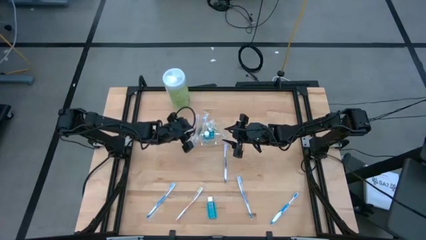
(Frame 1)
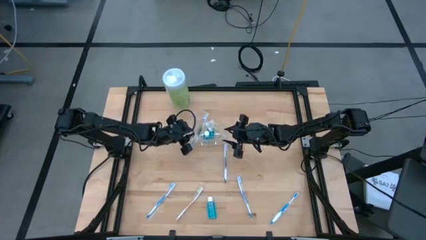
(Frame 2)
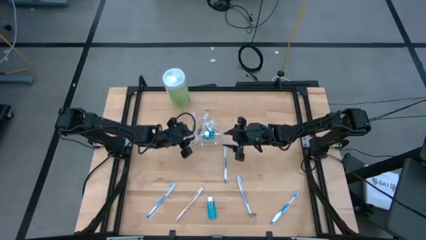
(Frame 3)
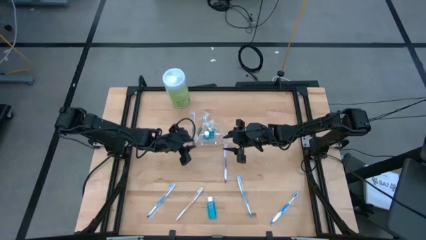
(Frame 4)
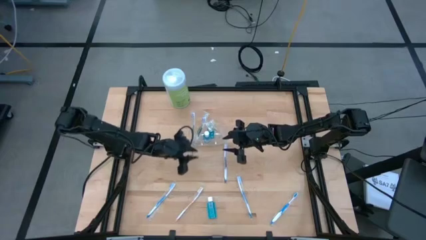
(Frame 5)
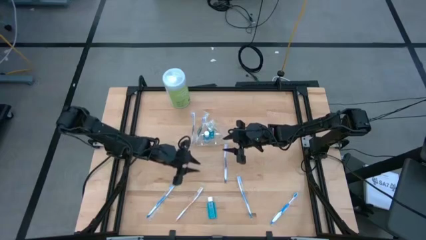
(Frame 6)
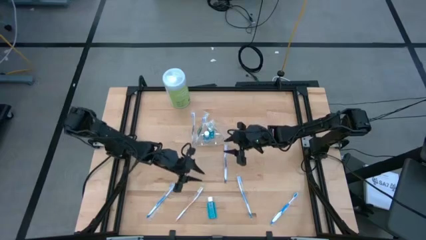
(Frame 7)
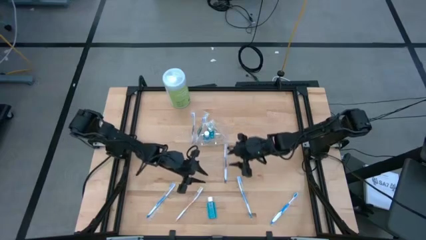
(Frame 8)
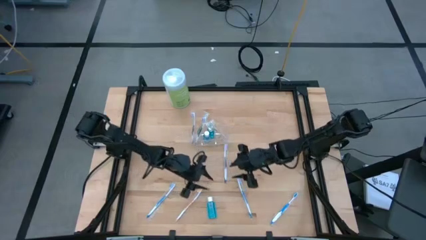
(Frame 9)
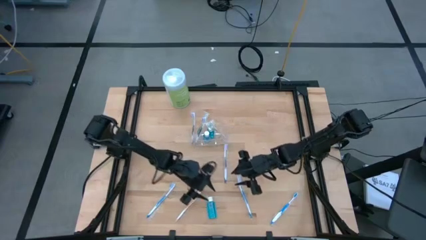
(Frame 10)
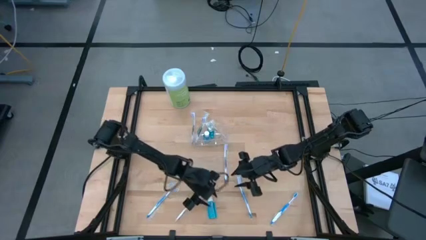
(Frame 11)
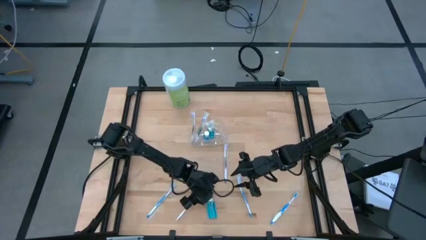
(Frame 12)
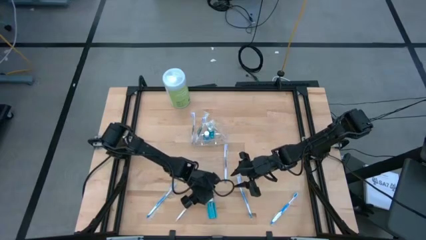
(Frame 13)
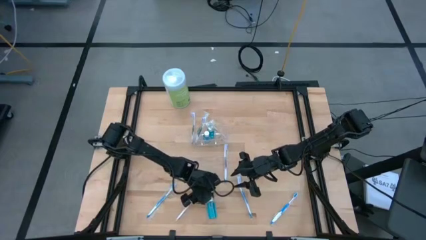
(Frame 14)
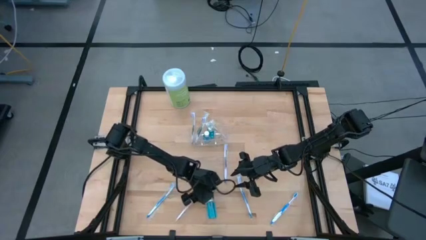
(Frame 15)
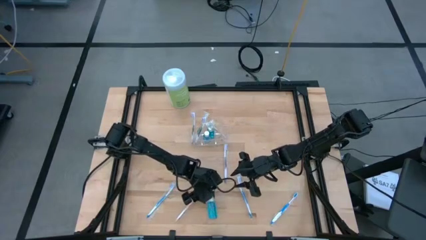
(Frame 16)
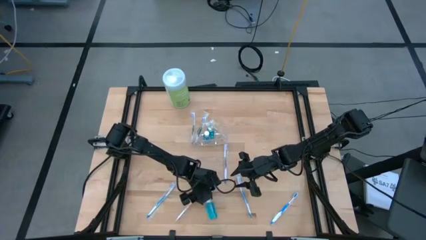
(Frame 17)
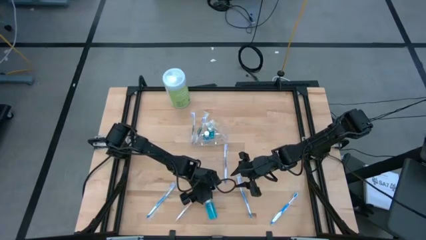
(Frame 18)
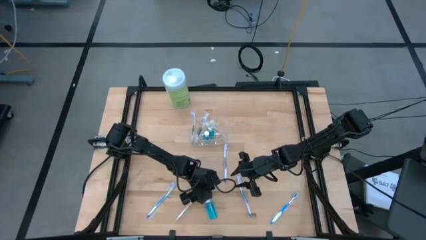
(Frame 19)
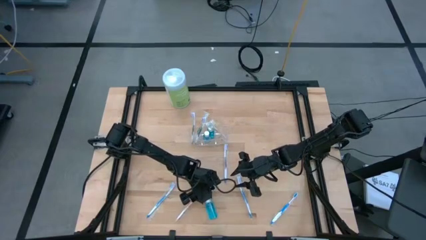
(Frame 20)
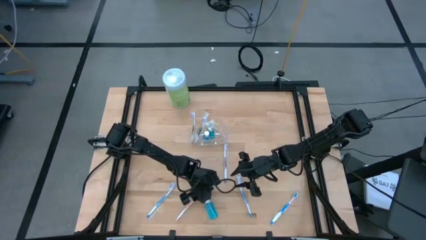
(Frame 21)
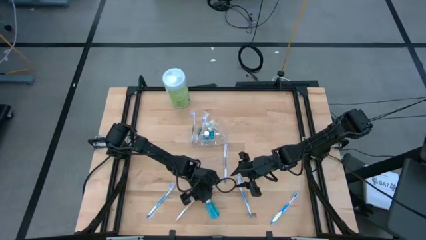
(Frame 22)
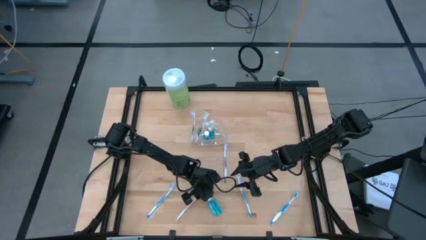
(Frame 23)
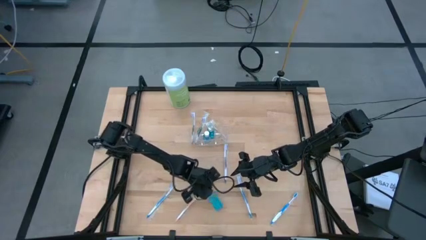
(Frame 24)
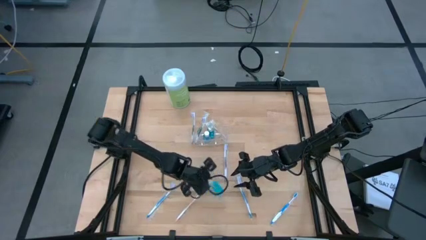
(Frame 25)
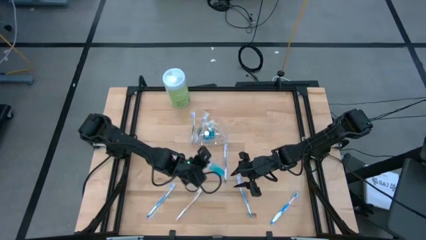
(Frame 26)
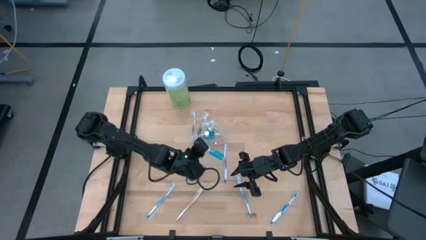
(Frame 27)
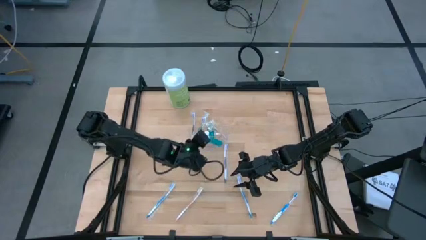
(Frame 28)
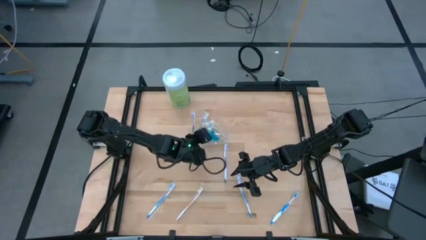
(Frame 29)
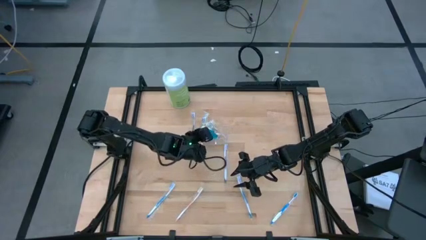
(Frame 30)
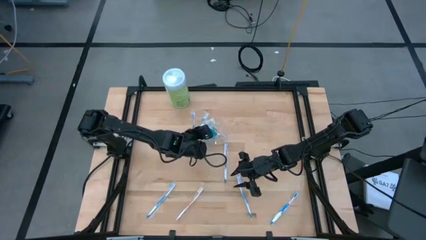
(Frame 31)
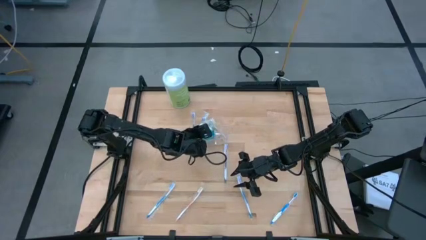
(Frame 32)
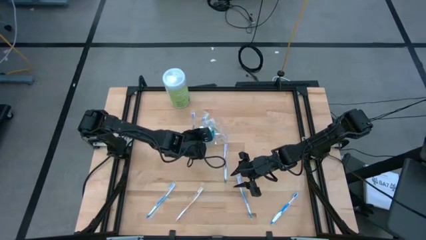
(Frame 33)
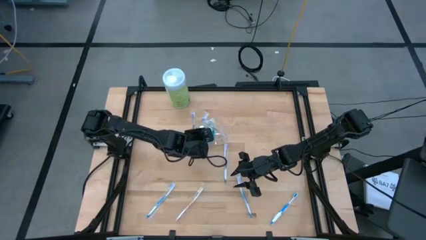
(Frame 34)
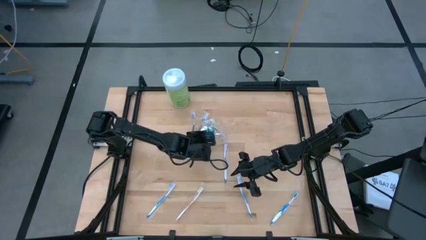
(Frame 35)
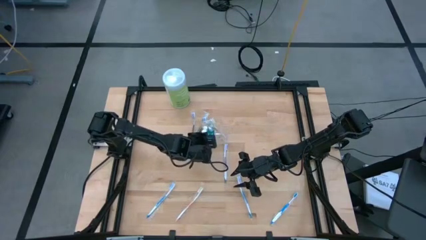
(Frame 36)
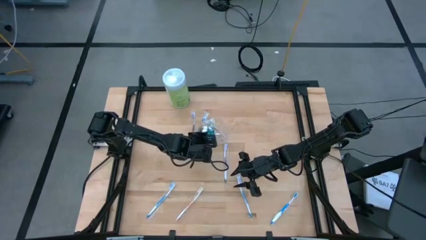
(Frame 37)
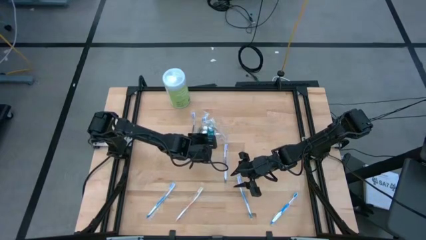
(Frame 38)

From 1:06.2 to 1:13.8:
Task: Pick & Place toothbrushing station
Put the mouthwash into the transparent organizer

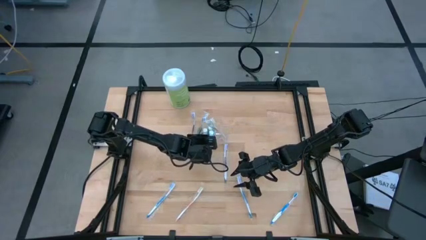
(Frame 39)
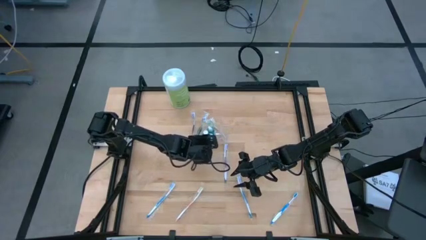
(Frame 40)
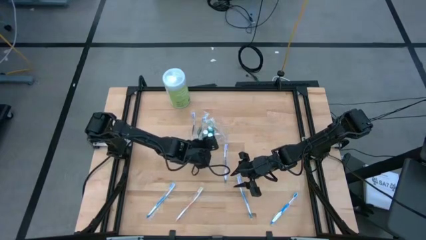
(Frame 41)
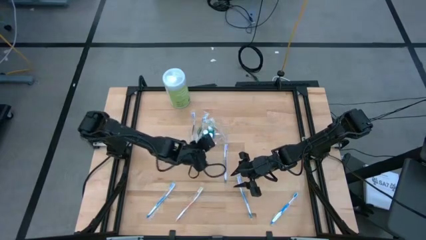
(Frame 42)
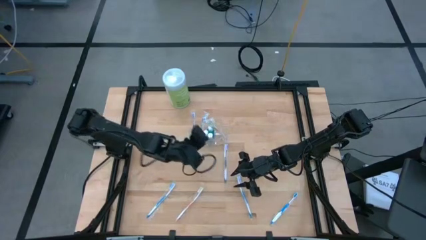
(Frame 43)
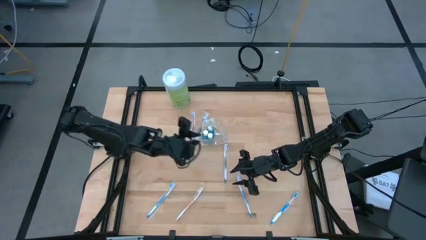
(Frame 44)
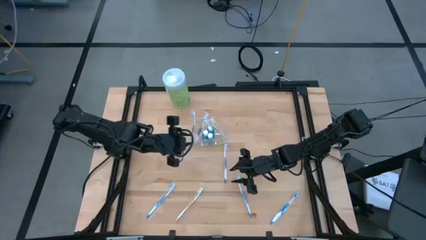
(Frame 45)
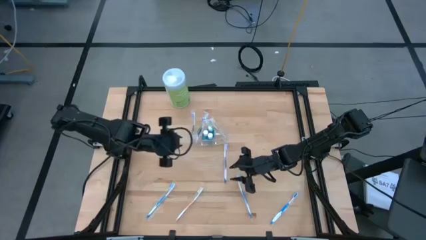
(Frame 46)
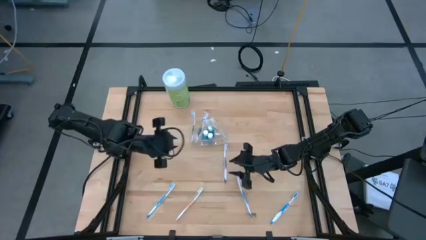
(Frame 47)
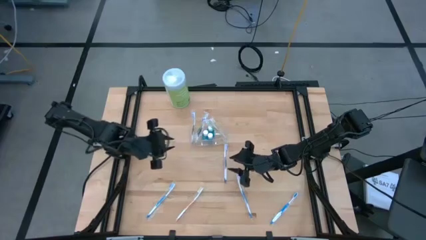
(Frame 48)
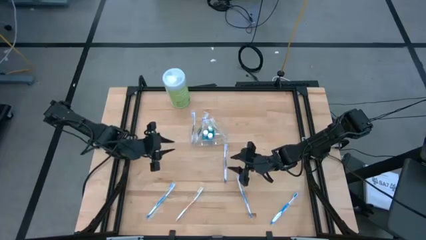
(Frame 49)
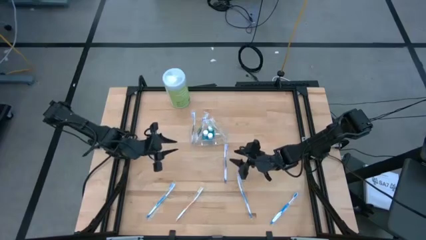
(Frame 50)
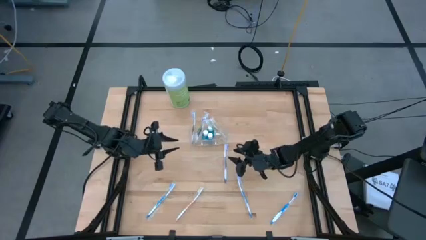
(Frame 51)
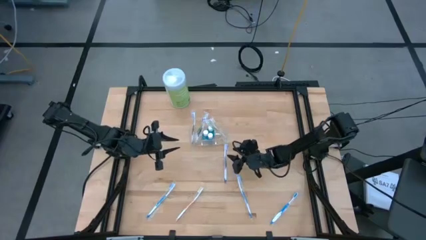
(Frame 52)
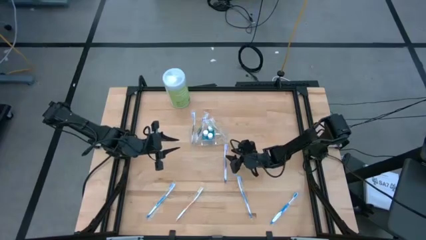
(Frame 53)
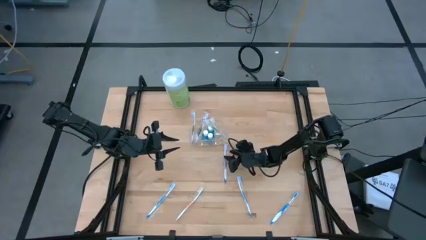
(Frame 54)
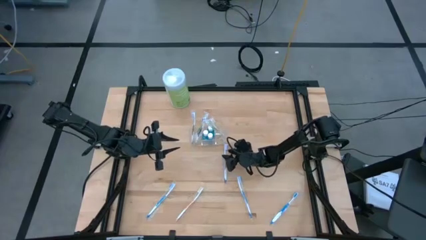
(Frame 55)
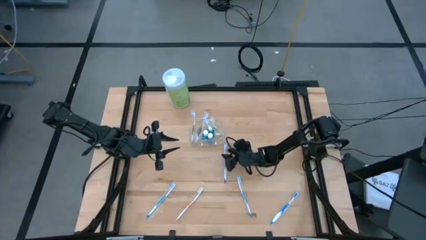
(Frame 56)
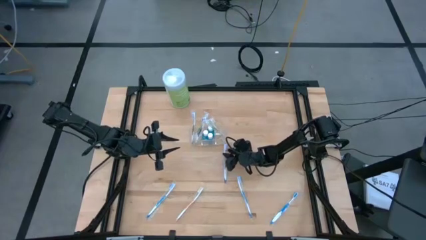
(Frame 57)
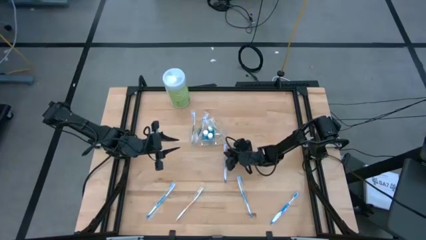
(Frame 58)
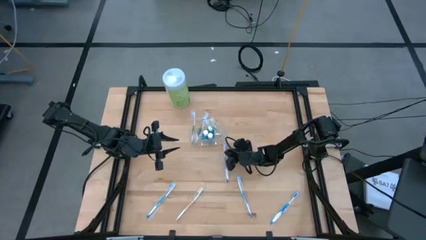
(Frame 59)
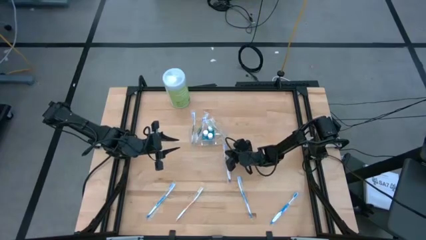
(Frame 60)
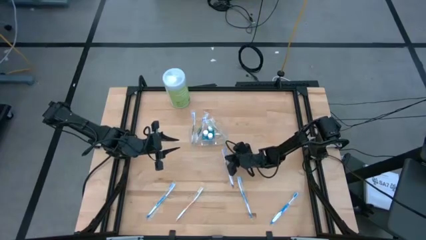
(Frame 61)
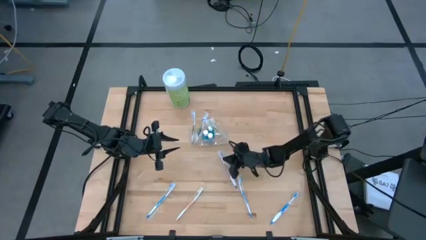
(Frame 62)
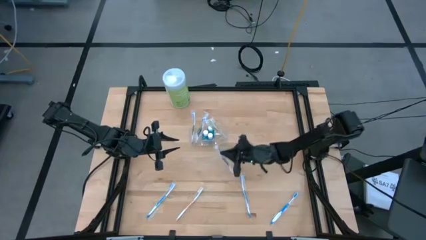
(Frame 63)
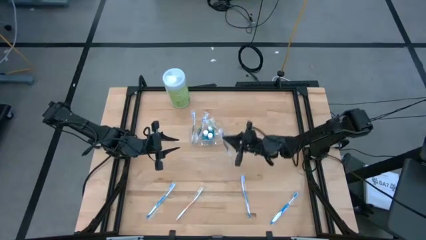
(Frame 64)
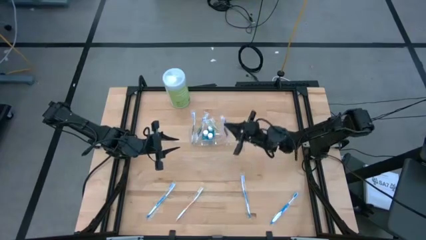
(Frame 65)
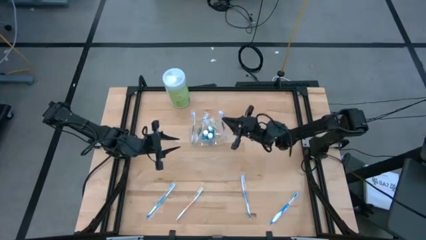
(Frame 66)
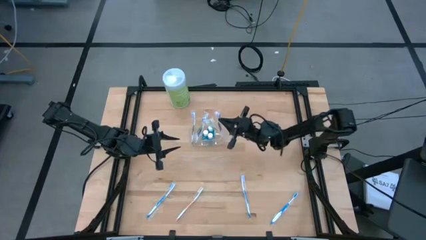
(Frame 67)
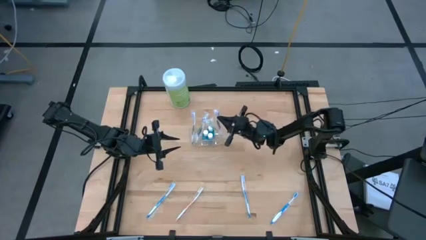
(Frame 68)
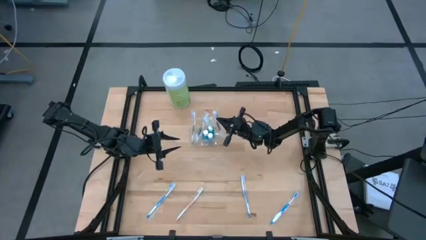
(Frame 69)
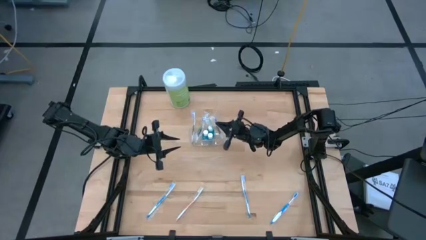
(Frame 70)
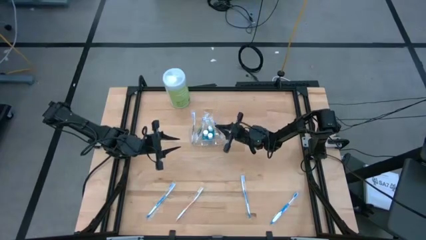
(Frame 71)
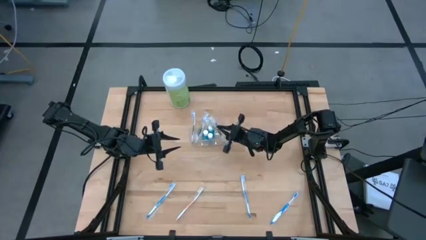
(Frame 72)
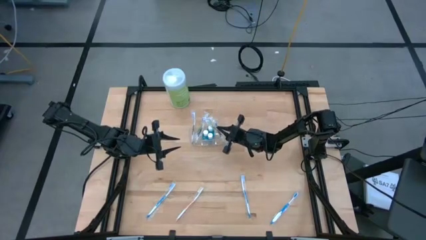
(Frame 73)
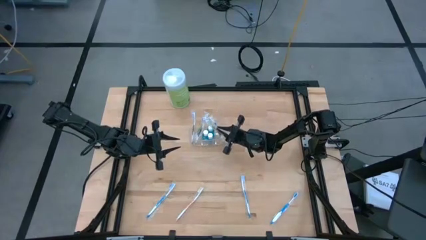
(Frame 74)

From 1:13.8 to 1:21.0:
Put the violet toothbrush into the transparent organizer

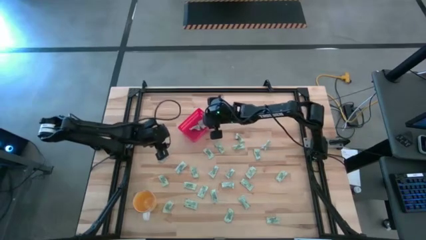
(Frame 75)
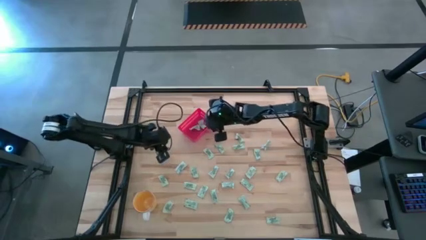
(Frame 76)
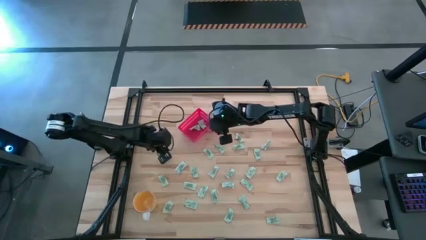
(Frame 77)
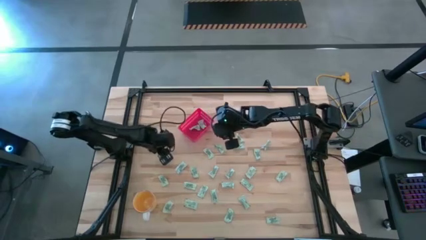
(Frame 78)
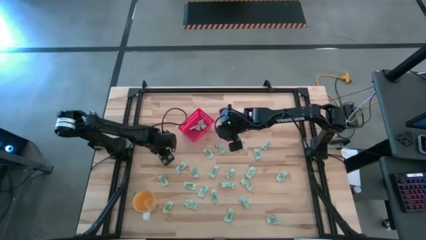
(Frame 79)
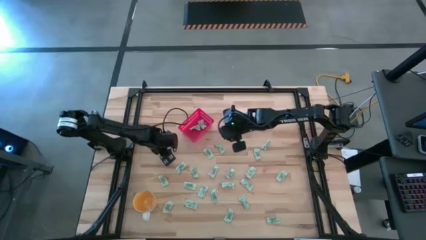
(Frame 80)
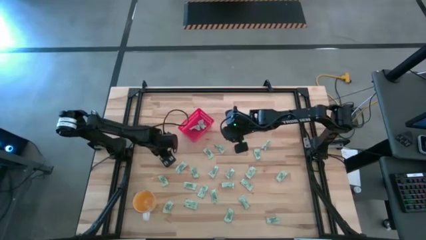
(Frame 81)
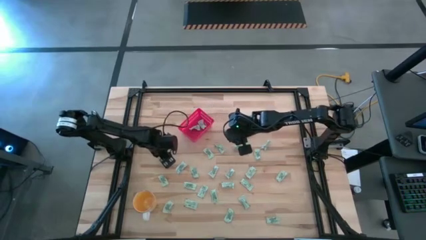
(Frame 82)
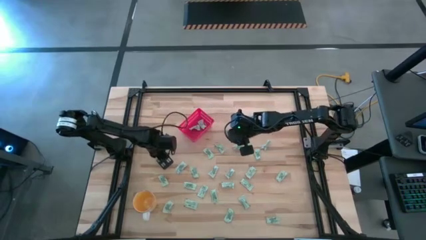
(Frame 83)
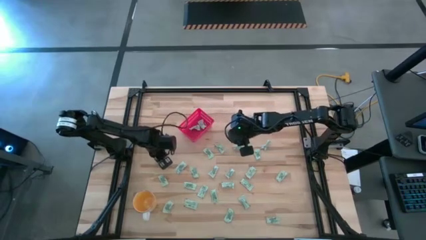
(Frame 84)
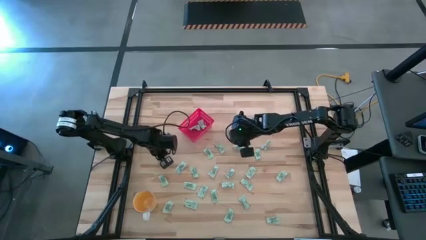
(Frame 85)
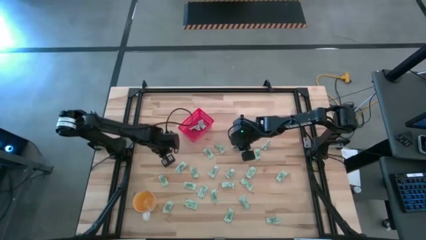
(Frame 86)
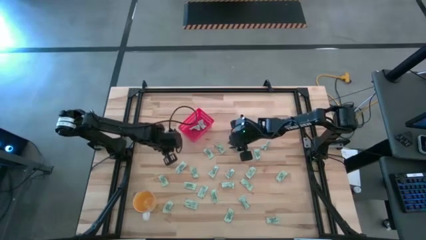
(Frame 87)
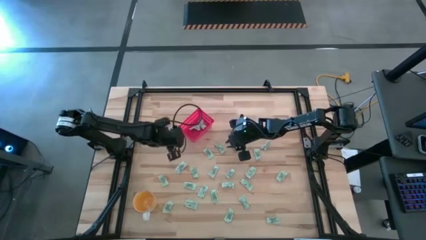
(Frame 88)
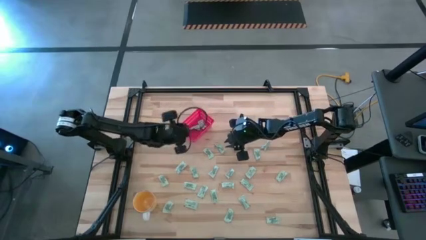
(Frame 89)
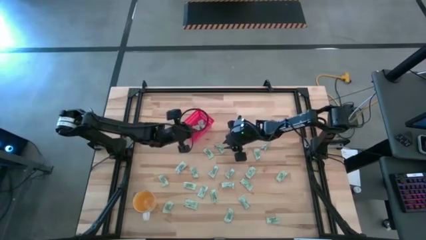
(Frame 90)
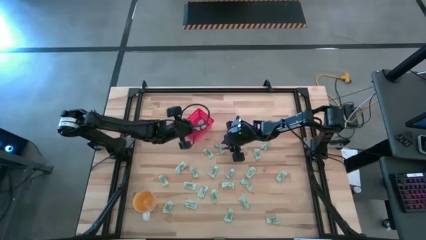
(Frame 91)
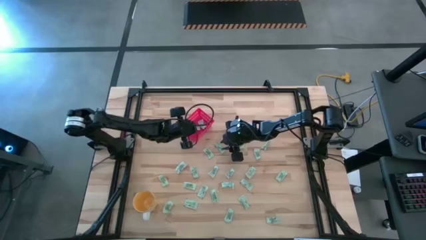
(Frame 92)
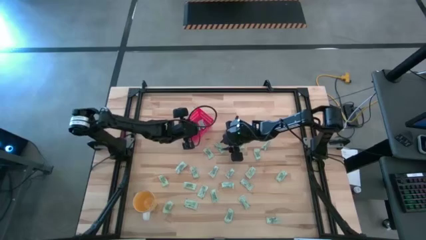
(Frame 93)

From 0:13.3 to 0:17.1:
Task: Pick and place Stevia / Truvia into bins
Put the white stevia packet into the red bin
